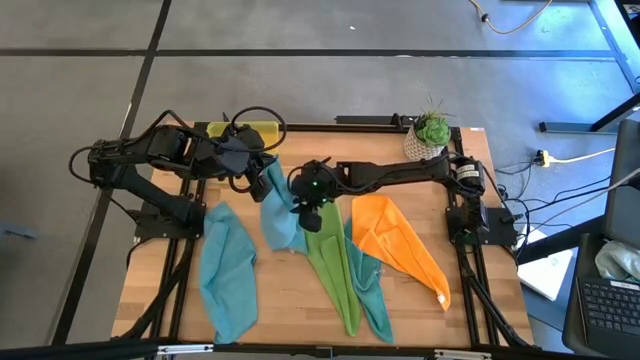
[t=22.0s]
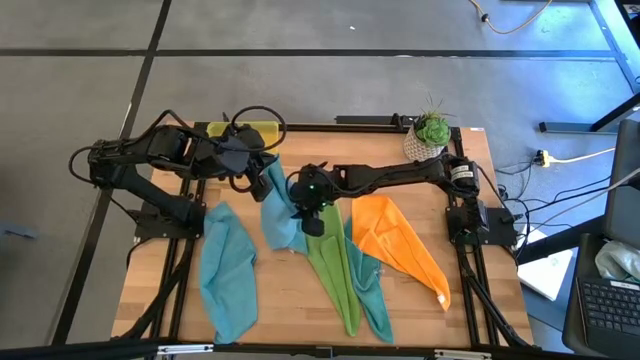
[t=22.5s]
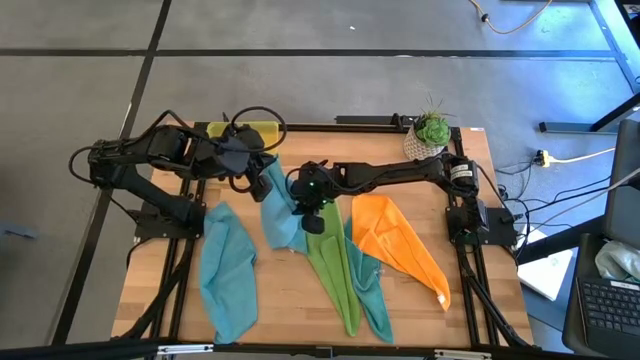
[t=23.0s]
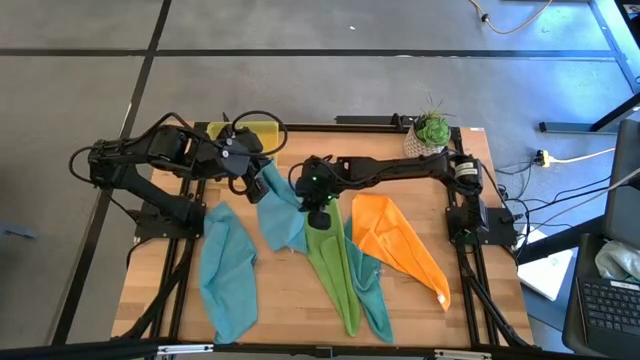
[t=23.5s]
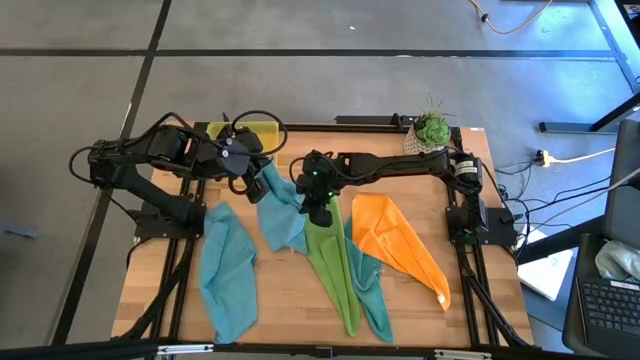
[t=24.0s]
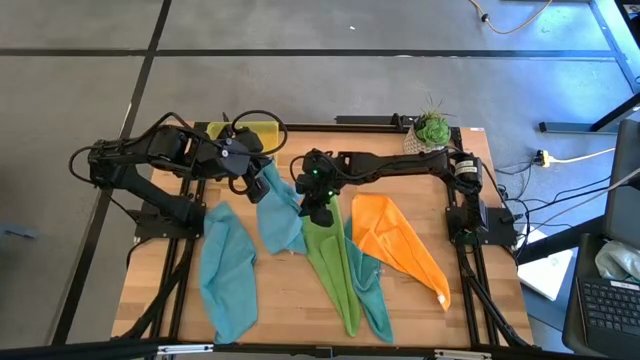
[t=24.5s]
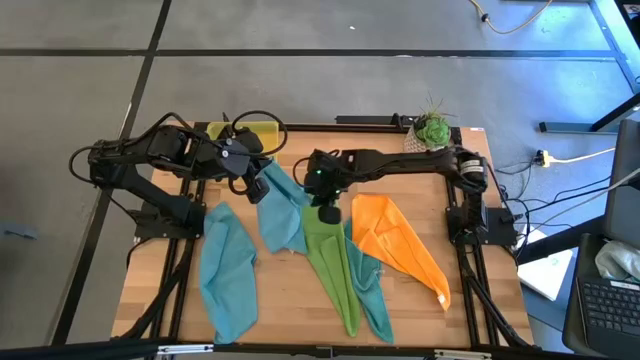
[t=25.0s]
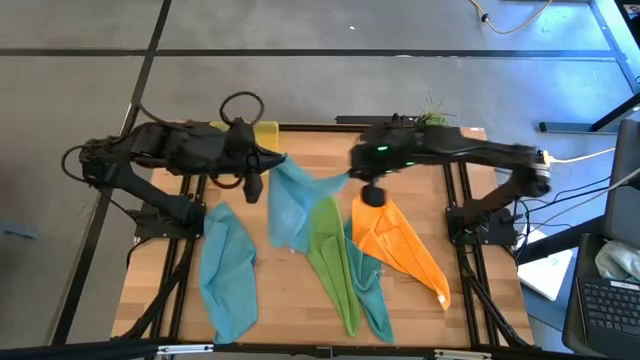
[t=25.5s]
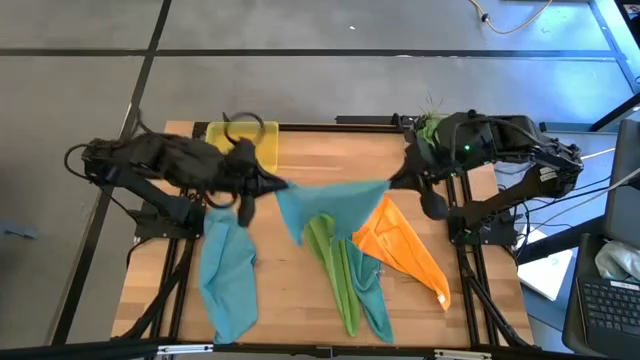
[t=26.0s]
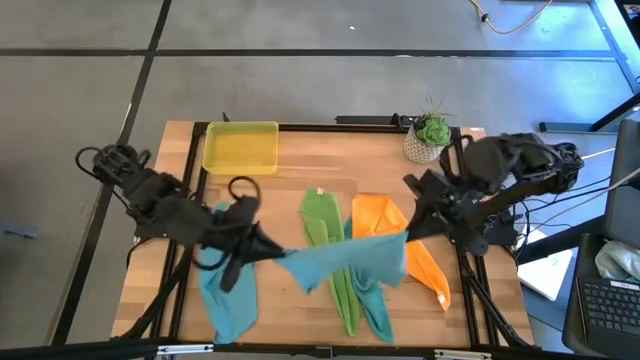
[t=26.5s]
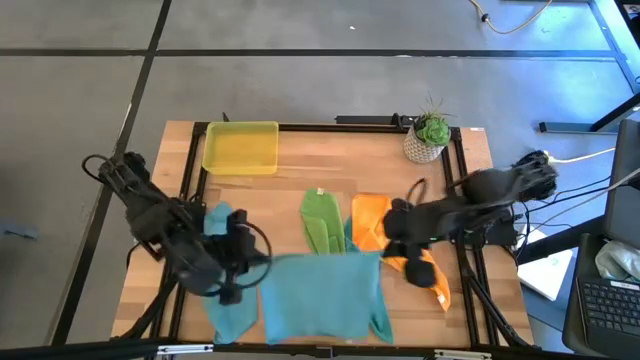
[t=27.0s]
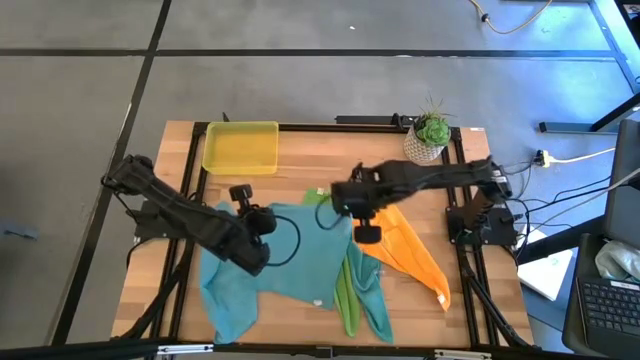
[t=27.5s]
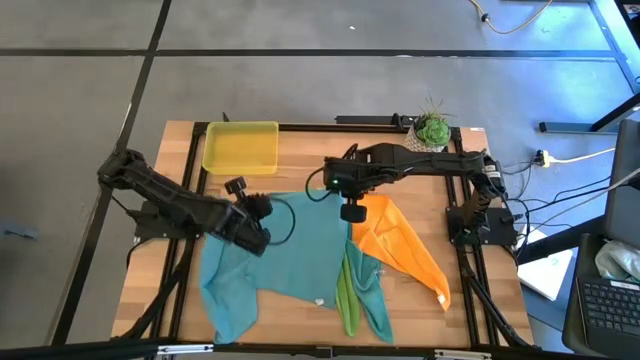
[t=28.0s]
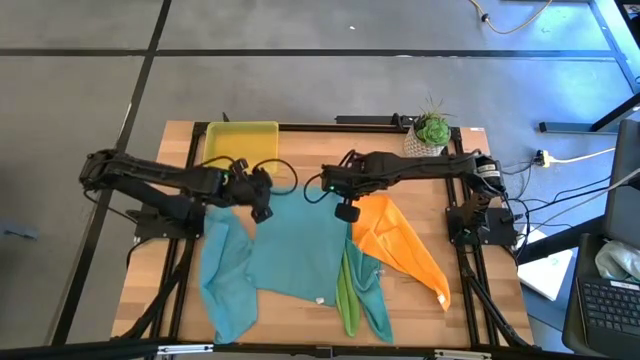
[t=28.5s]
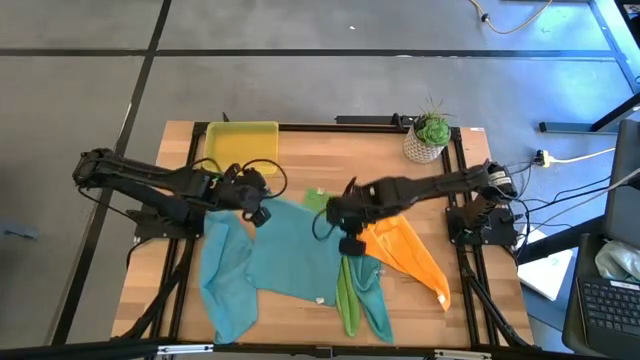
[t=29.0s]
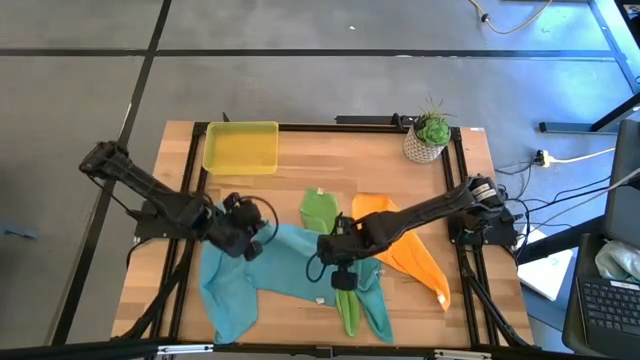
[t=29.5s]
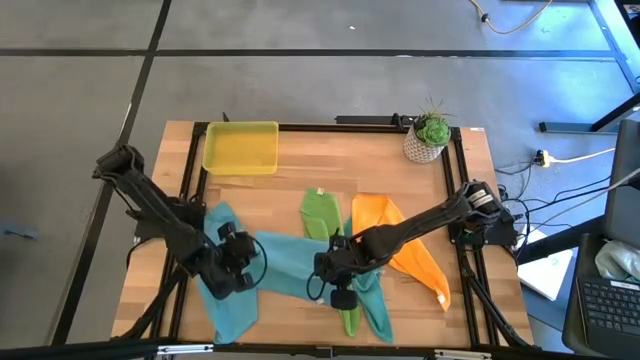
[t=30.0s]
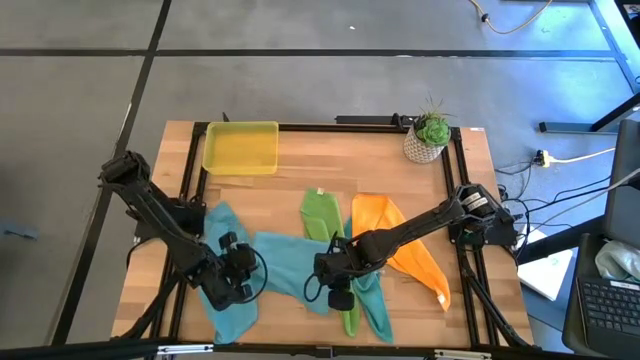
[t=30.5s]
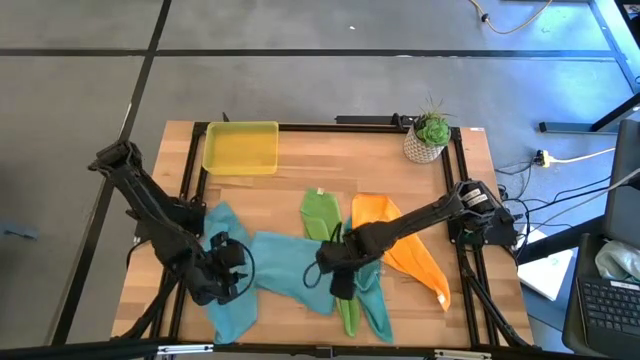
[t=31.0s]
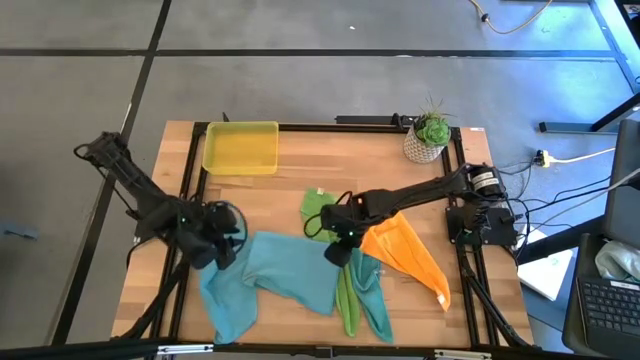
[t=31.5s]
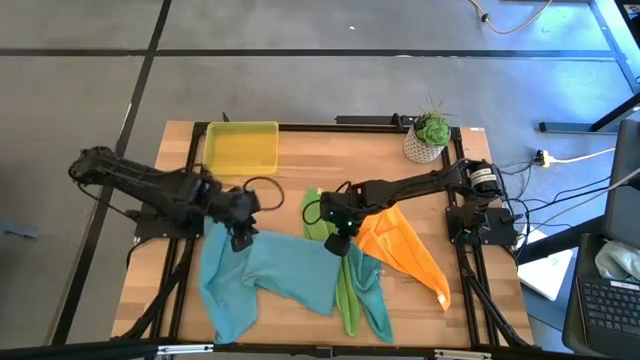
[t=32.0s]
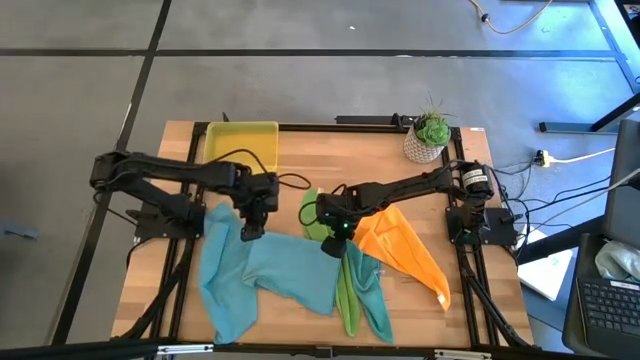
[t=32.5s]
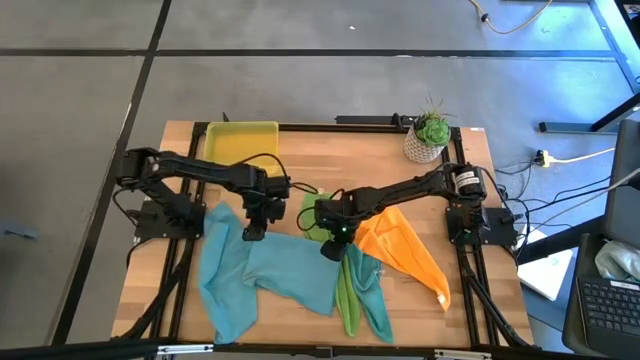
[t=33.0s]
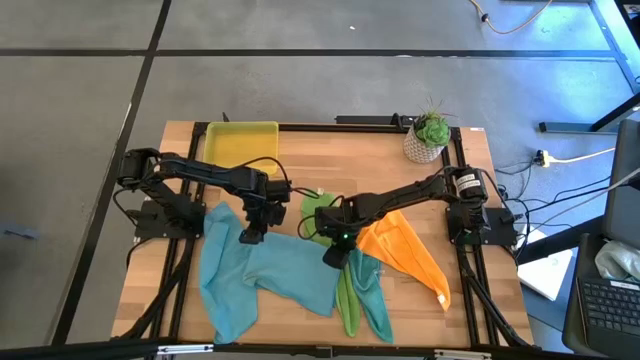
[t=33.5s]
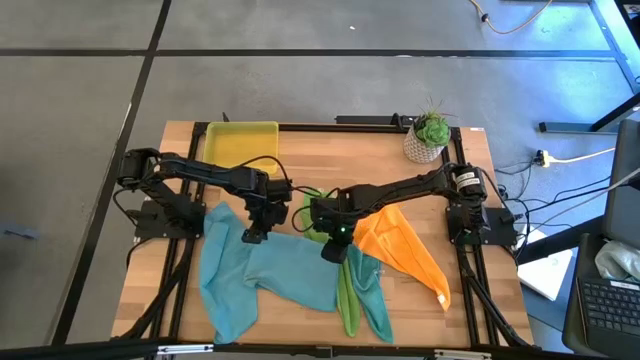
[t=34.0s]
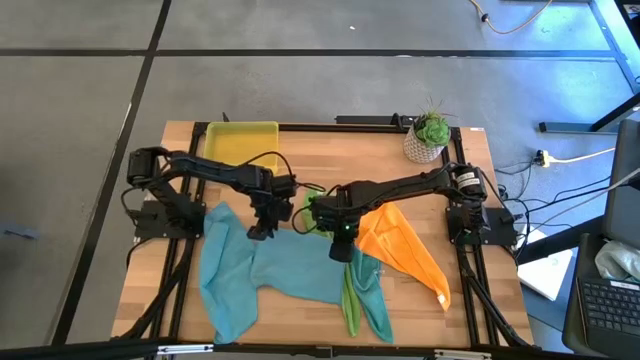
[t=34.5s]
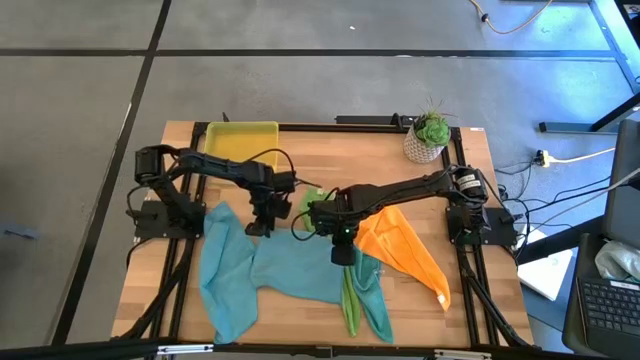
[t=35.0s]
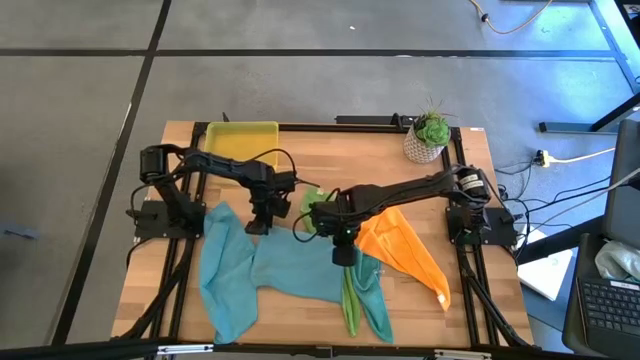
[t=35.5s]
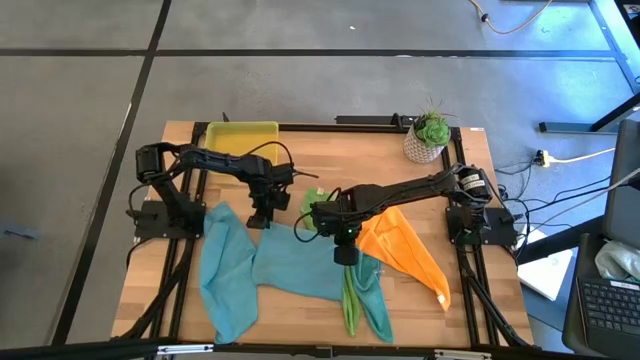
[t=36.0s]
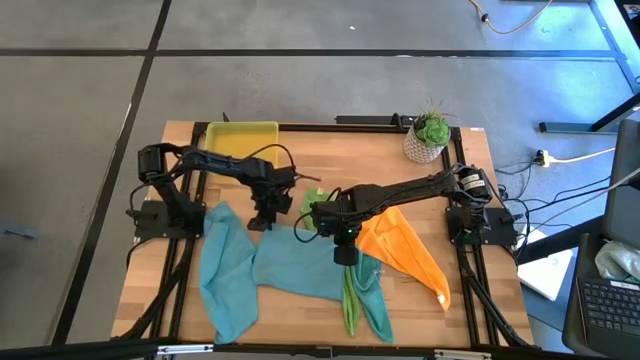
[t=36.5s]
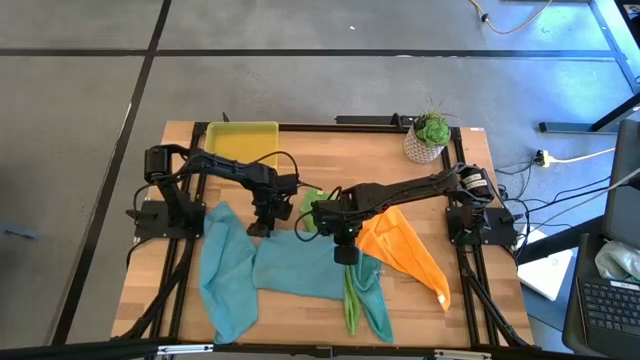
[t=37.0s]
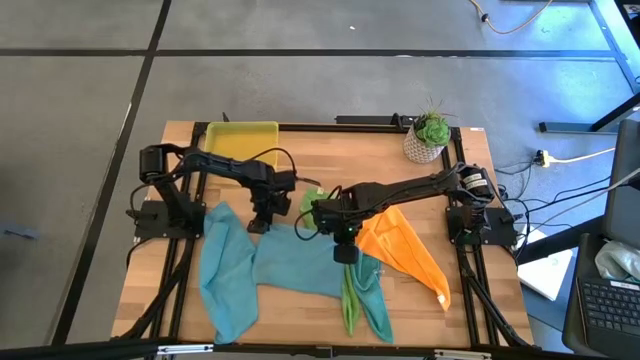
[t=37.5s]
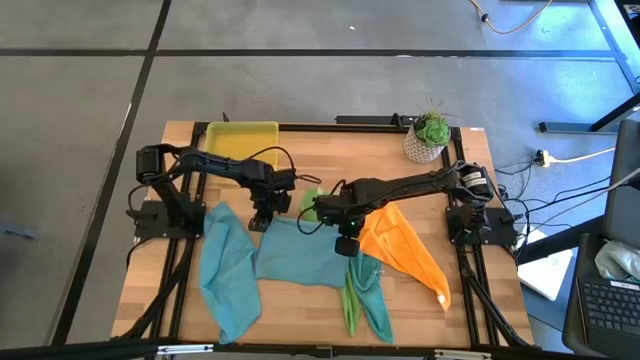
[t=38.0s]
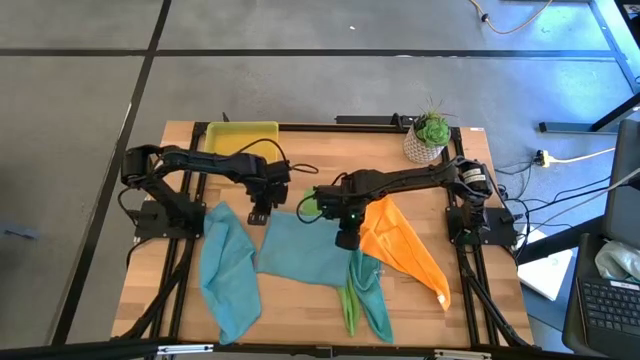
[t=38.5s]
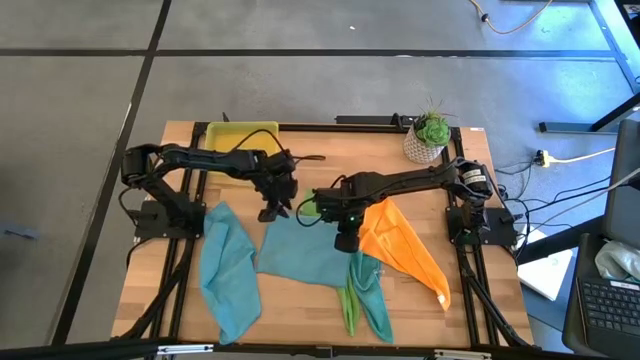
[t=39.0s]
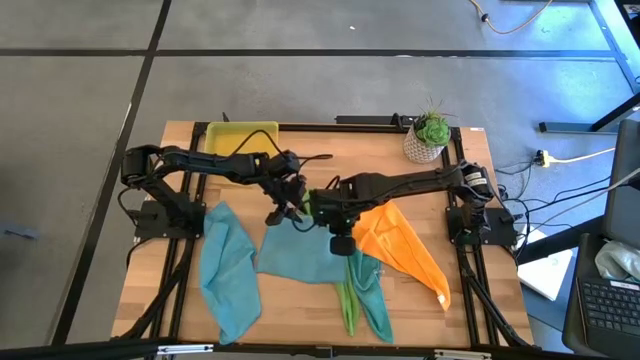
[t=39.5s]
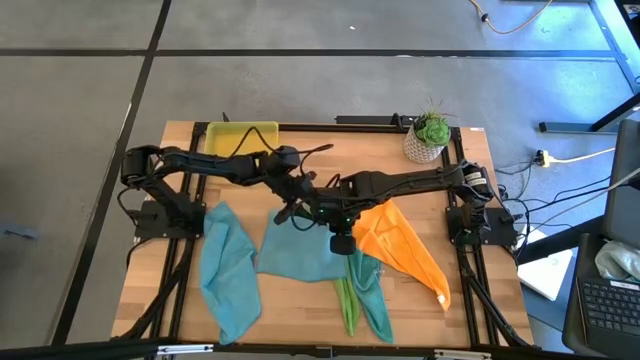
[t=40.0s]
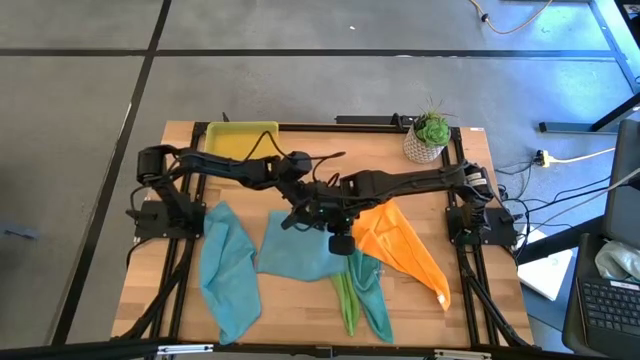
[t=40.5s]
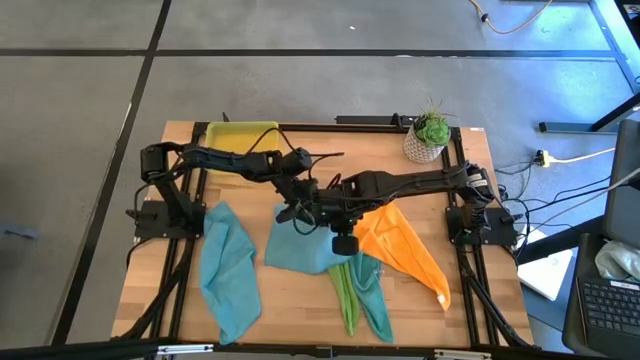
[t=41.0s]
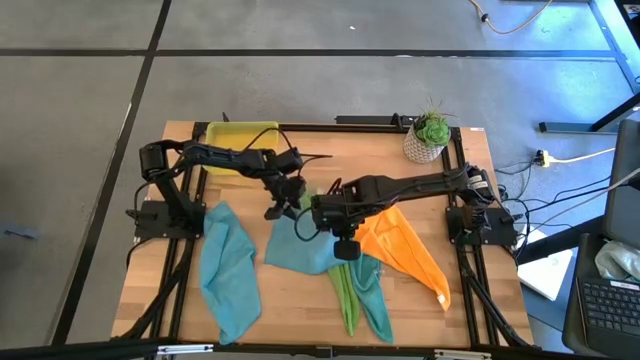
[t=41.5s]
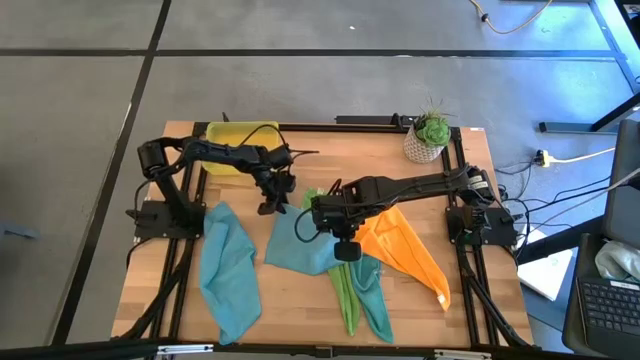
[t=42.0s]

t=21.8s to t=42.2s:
Task: Fold microfiber towels
Fold the center blue towel
